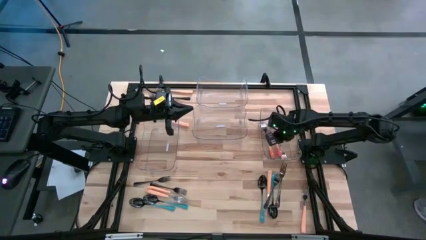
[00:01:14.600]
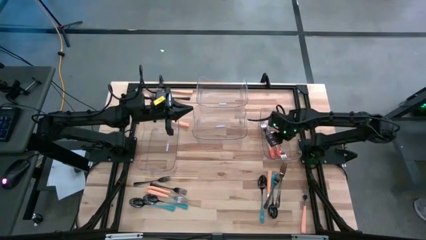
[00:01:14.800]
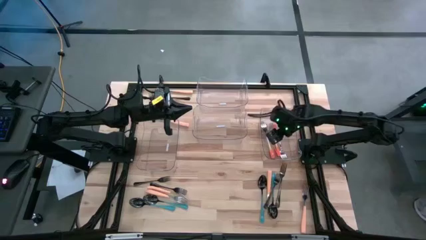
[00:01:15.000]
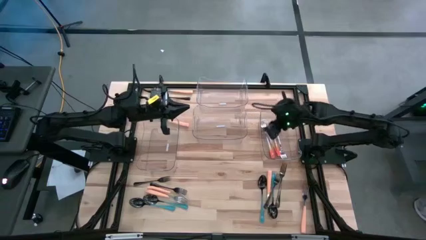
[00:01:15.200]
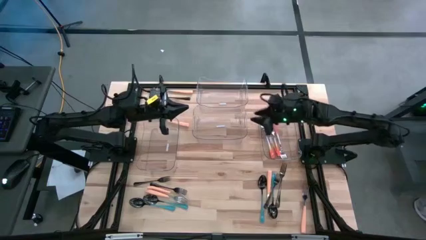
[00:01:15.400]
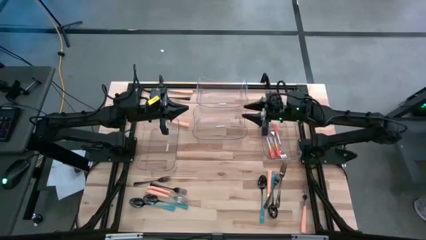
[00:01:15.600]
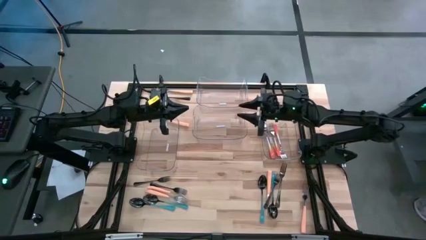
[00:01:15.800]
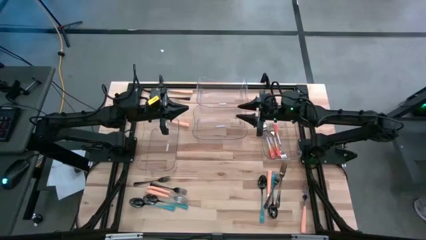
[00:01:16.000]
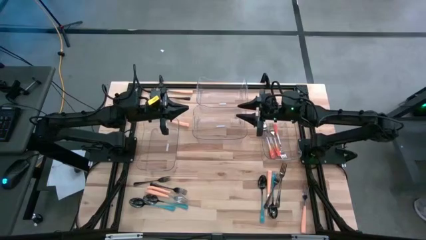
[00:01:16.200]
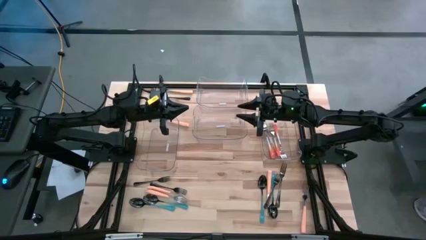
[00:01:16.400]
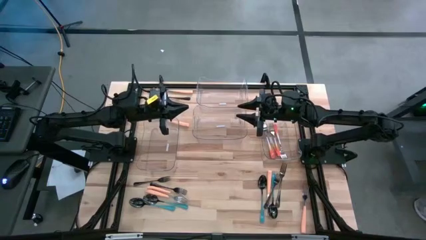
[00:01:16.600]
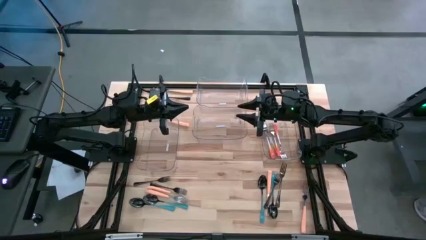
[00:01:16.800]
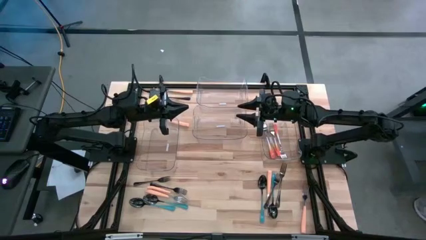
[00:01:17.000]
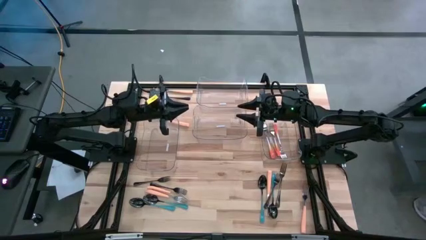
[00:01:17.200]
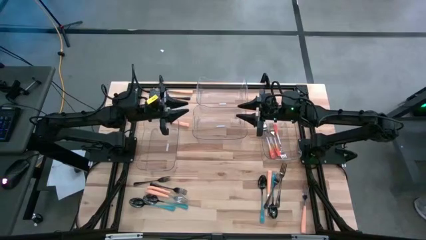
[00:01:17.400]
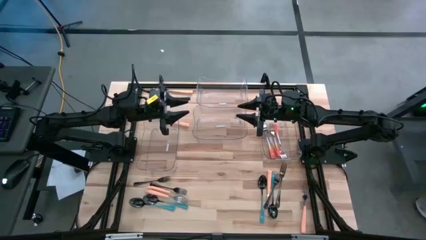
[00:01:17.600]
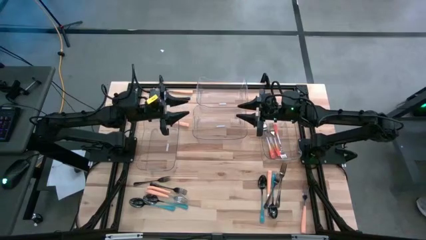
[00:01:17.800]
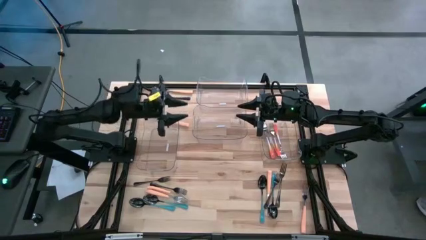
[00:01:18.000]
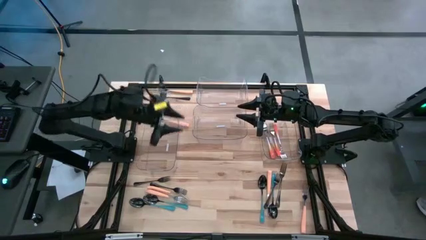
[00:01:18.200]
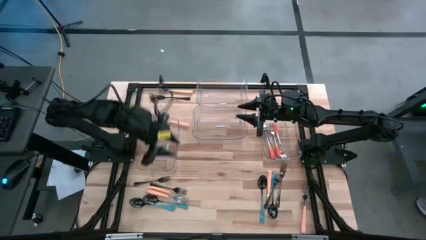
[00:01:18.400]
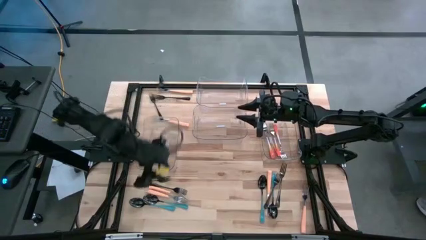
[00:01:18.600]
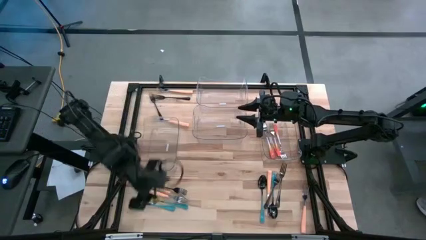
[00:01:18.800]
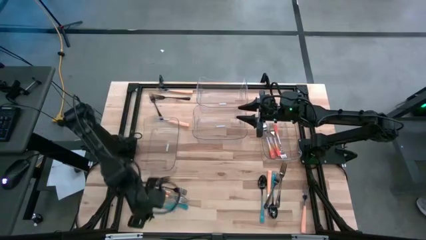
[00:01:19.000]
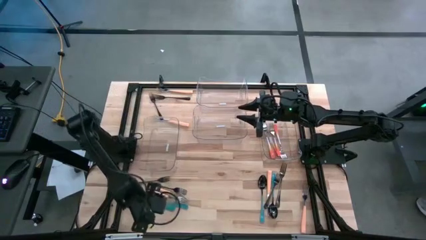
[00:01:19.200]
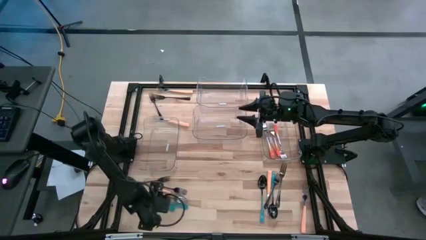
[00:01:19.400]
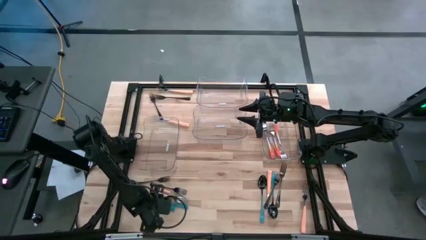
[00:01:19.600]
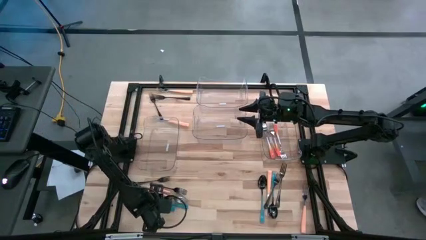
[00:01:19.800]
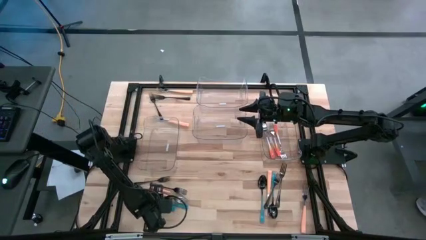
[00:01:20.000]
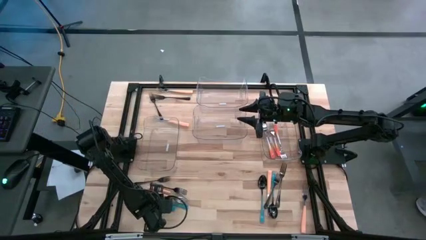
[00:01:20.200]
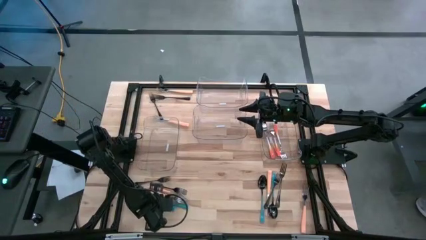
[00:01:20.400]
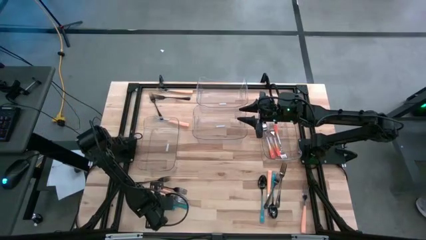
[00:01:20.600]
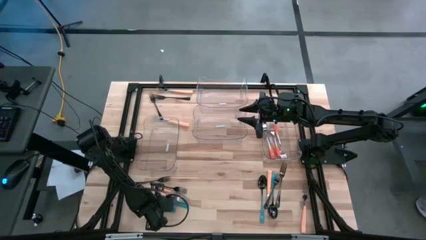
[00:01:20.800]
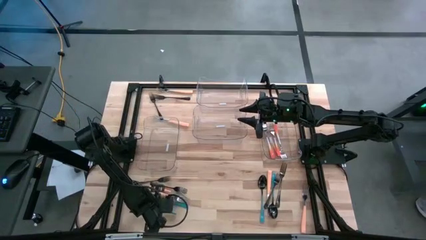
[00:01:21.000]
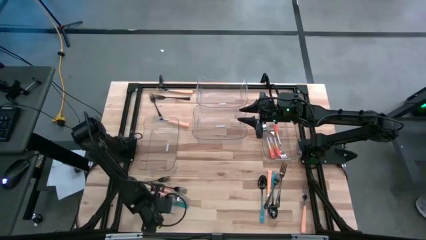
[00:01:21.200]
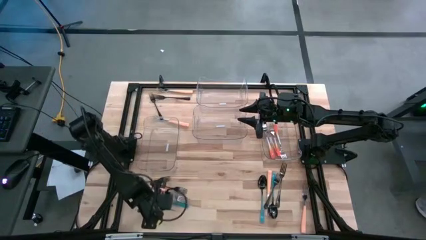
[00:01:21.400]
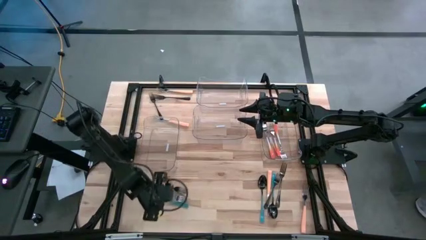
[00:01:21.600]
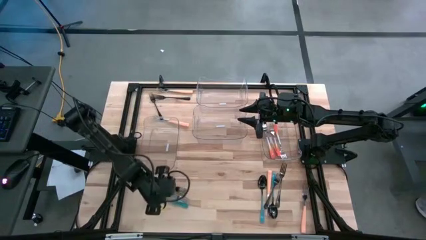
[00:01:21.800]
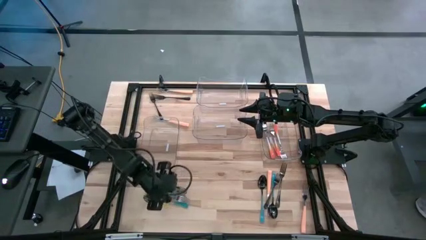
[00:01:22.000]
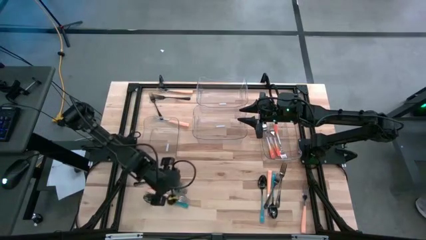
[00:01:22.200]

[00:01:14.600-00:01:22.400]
Task: Sort silverware by color (type)
Put the blue spoon into the middle transparent bin

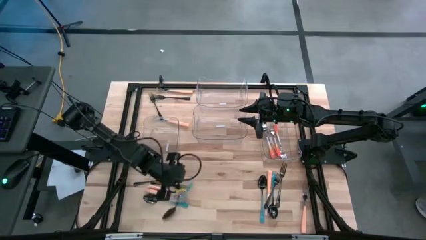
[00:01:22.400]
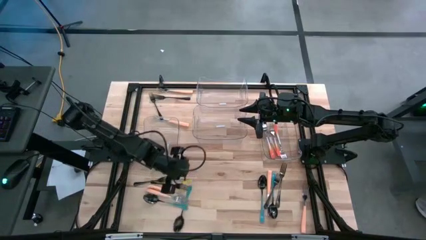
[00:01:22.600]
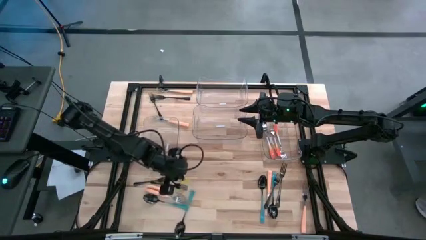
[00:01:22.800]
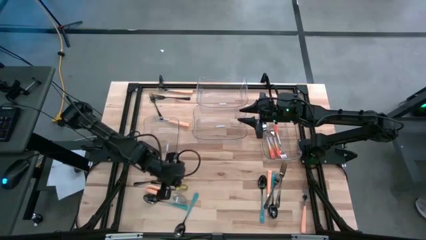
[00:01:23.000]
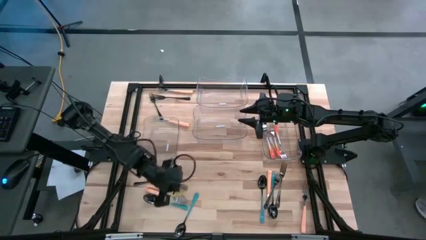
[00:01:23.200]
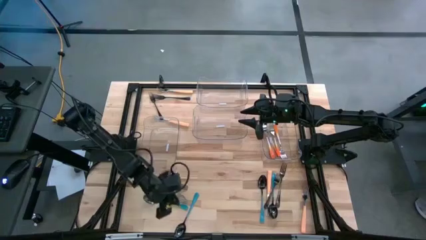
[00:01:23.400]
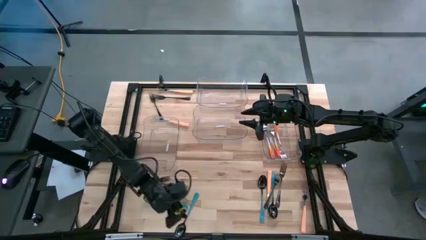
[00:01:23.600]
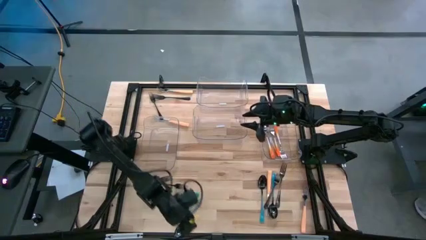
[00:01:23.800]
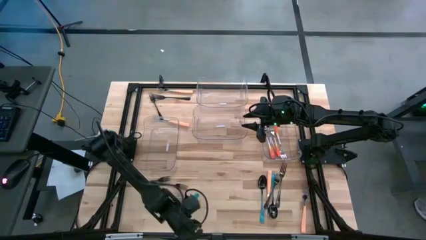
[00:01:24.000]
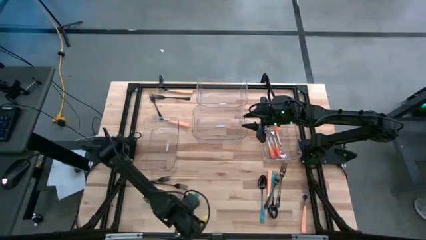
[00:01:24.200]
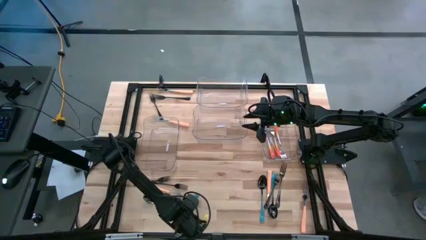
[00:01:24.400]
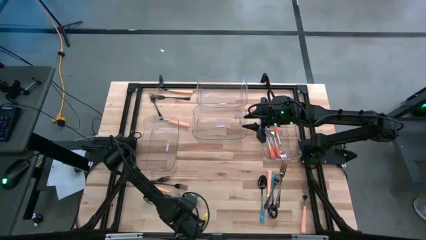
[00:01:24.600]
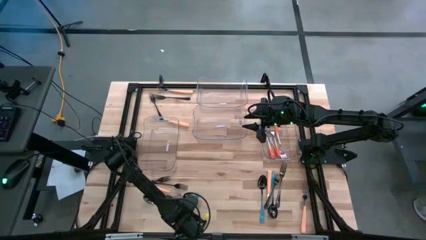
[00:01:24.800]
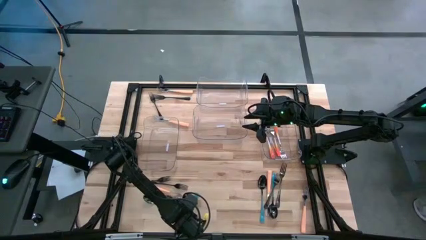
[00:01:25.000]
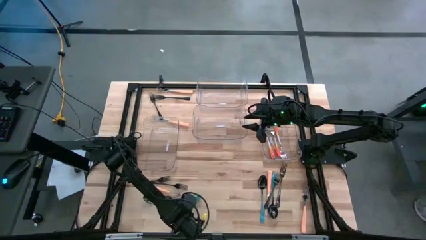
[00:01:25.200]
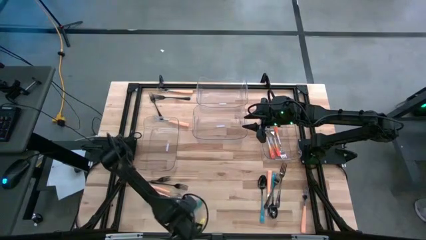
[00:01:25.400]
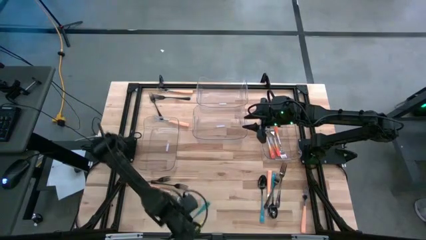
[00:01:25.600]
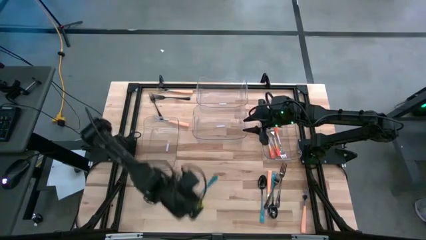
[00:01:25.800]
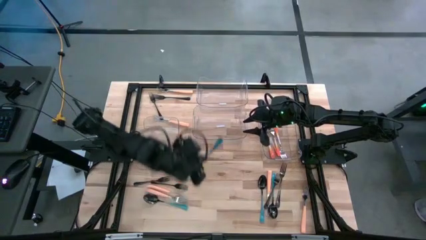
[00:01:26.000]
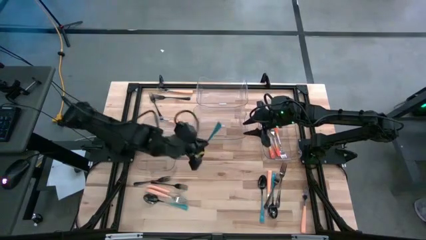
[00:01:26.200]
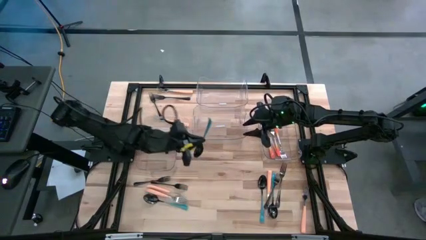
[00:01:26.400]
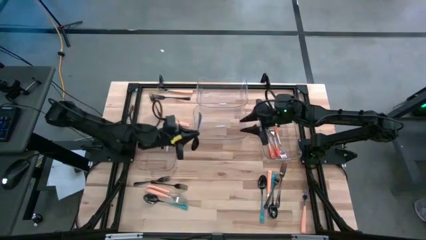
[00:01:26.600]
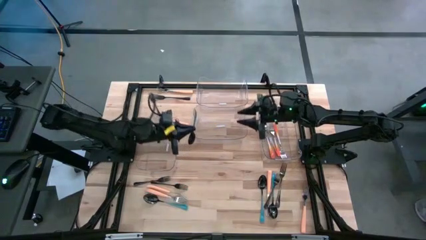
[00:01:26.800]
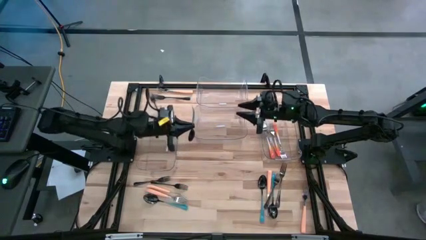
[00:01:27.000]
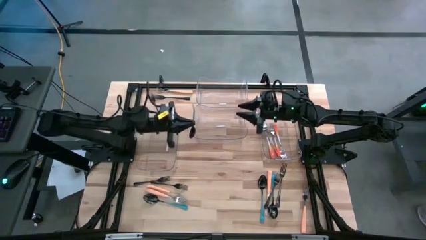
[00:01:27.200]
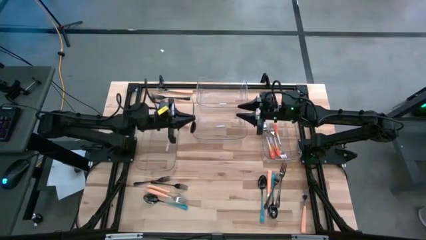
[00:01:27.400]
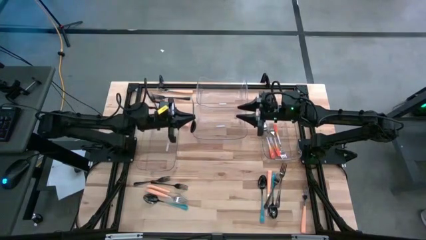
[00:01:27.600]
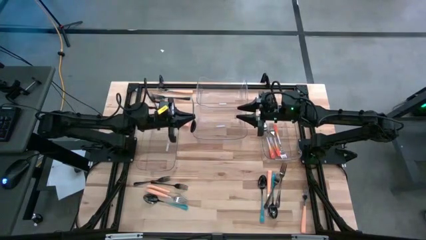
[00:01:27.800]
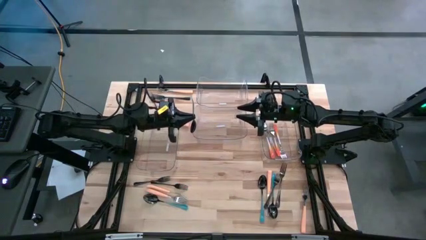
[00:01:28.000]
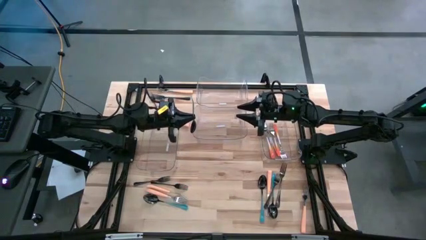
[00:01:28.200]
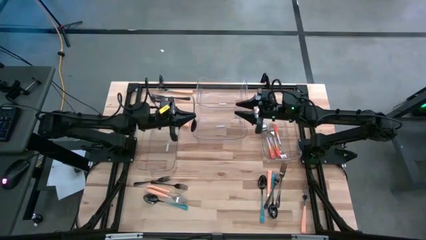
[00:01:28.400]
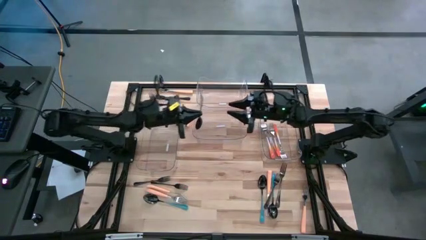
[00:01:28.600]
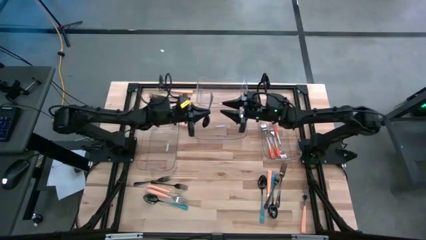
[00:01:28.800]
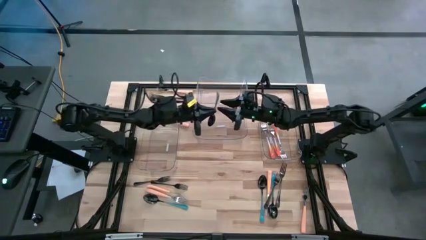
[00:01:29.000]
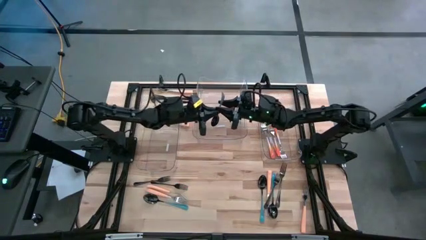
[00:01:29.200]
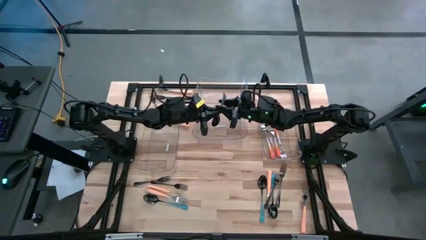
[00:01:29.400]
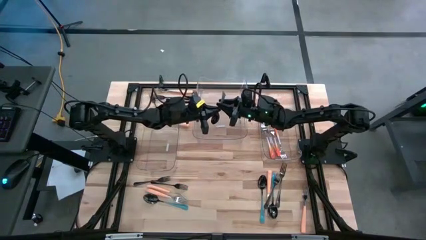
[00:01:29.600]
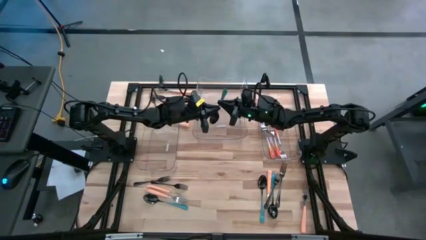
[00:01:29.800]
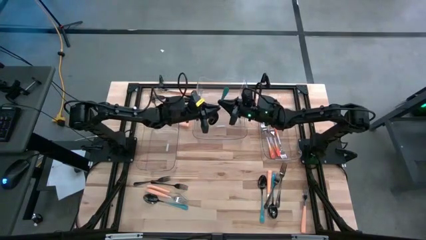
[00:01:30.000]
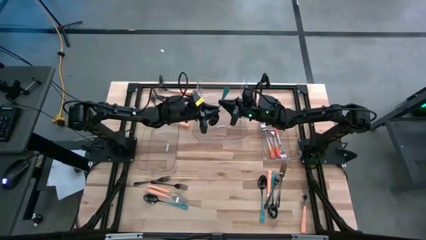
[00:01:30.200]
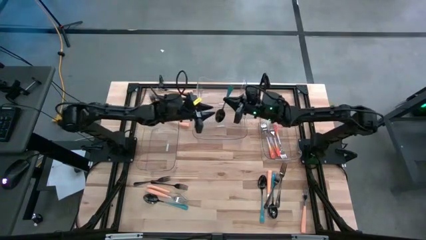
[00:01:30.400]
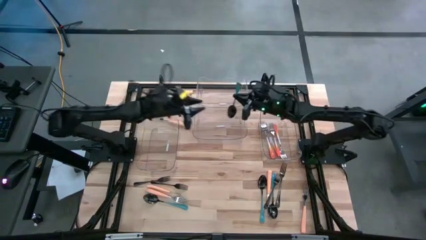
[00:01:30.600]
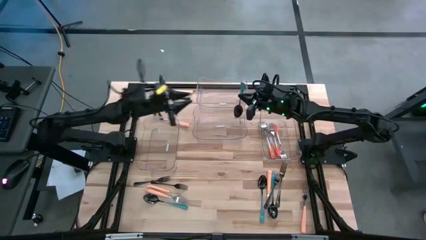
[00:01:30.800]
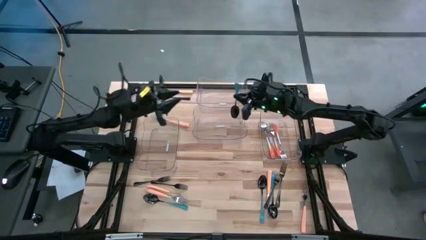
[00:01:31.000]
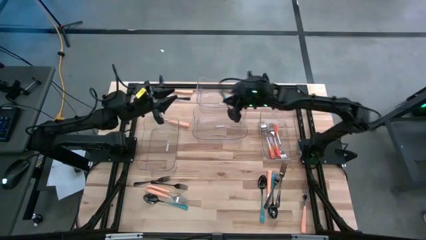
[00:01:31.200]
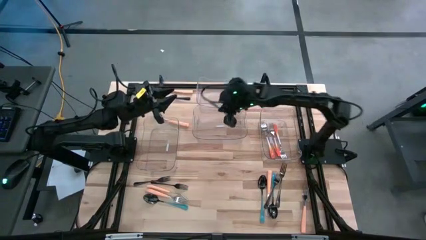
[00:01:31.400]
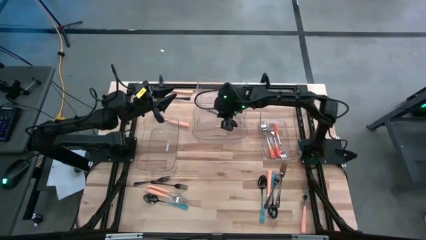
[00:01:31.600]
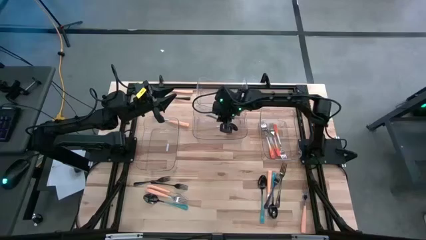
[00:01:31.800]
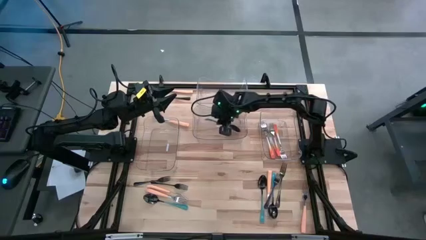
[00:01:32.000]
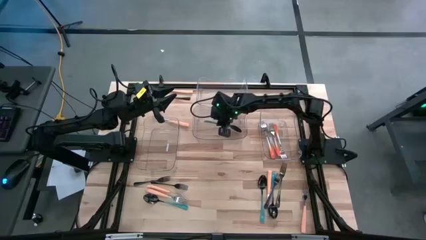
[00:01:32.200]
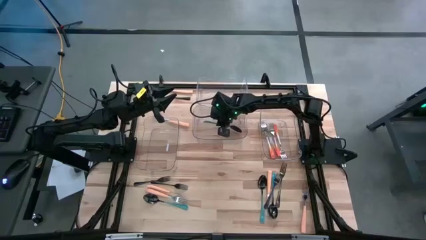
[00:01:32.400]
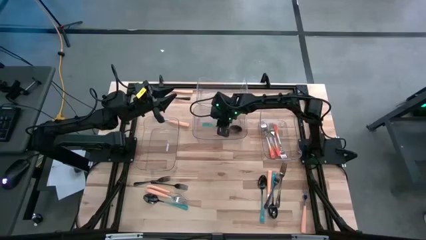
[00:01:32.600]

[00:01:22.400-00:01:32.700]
Put the blue spoon into the middle transparent bin
